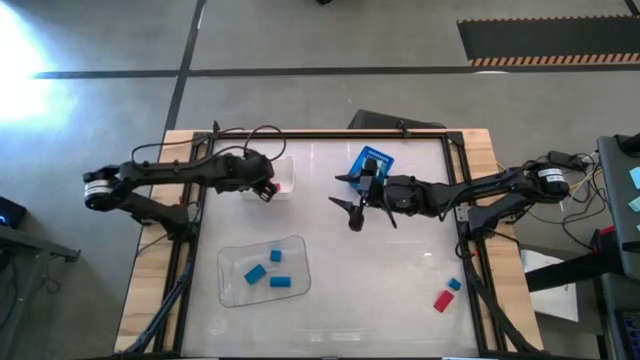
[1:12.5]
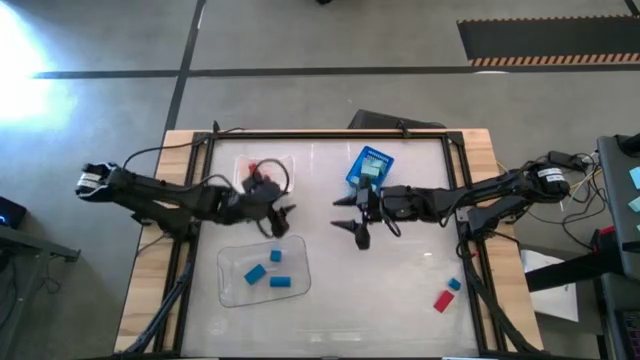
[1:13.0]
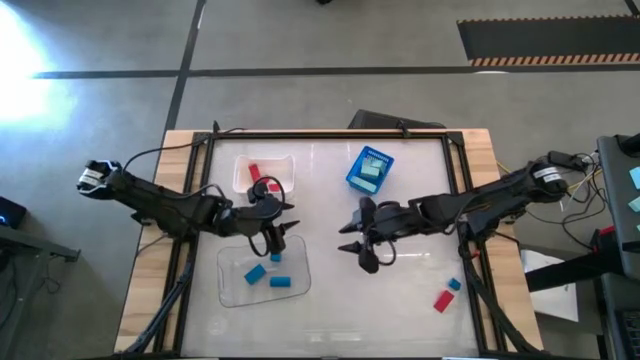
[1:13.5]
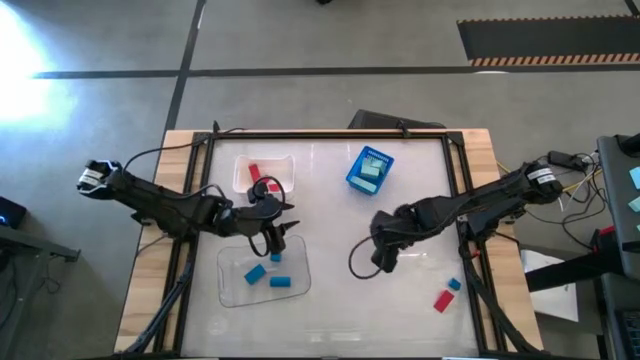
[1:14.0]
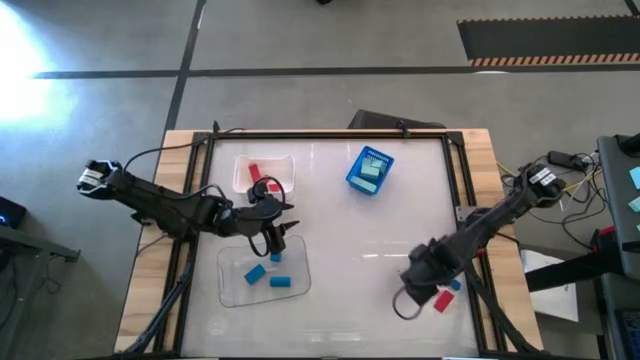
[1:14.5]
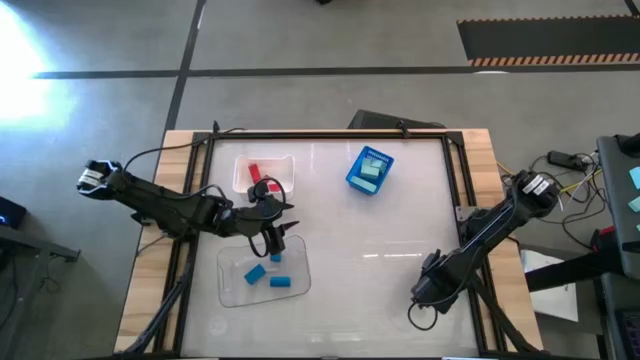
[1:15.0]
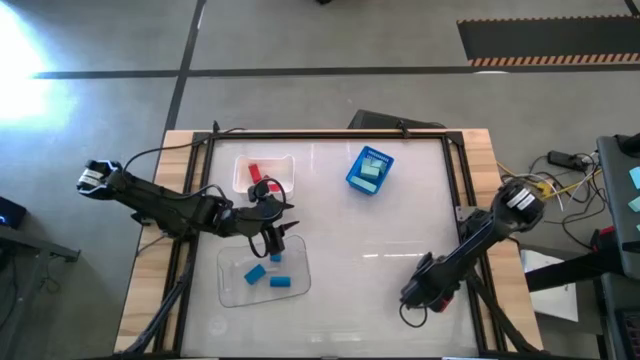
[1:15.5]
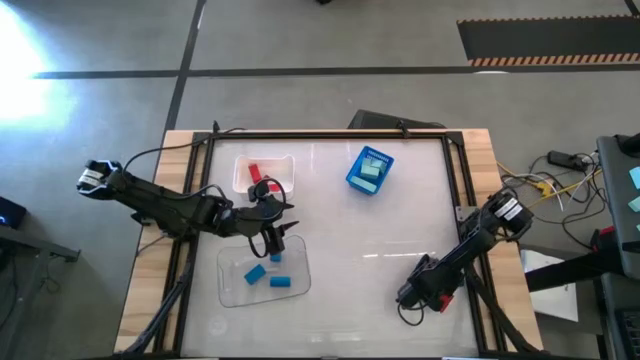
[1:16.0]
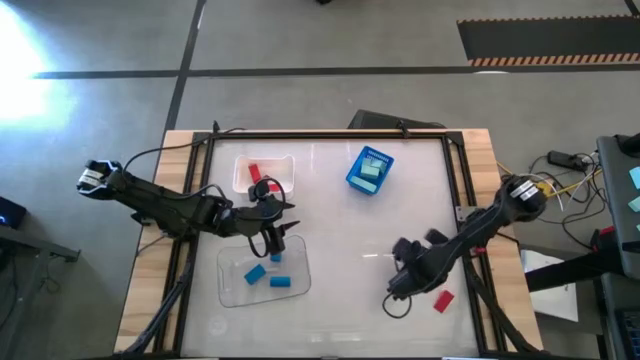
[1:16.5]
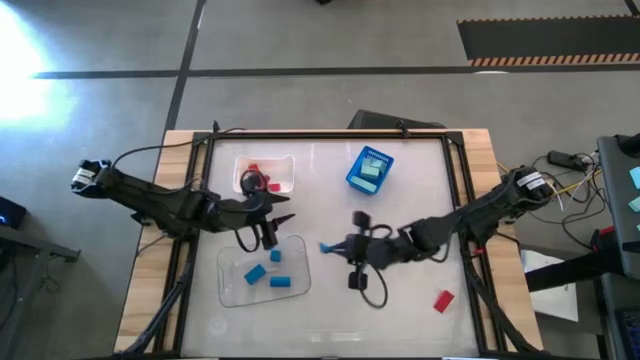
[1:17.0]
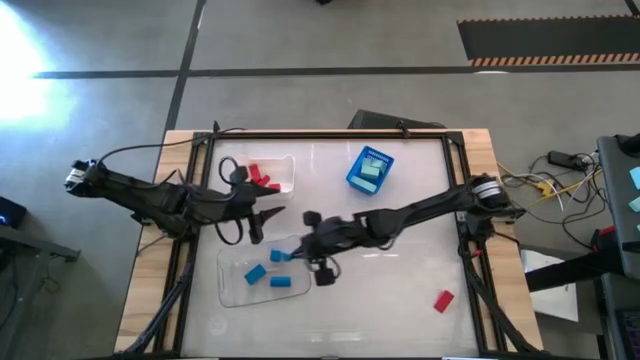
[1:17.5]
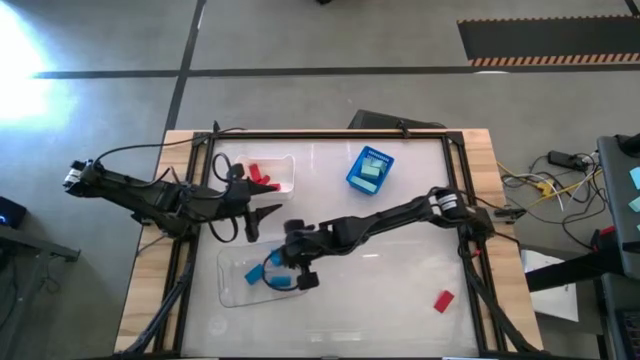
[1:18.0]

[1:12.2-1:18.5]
Task: Sort & place blocks by color
Put the blue block into the transparent bin

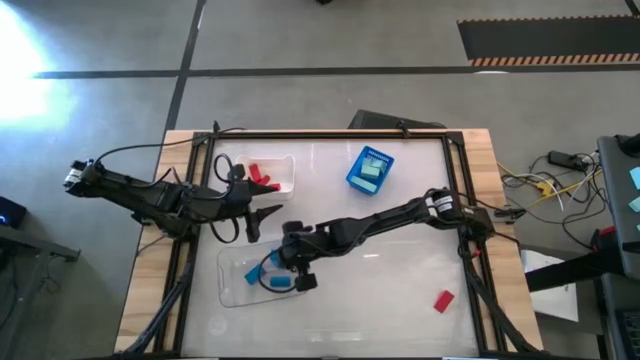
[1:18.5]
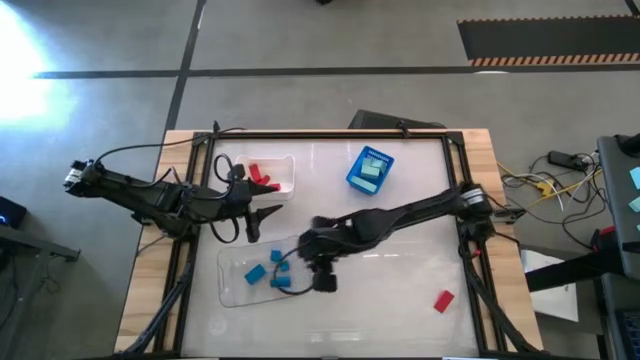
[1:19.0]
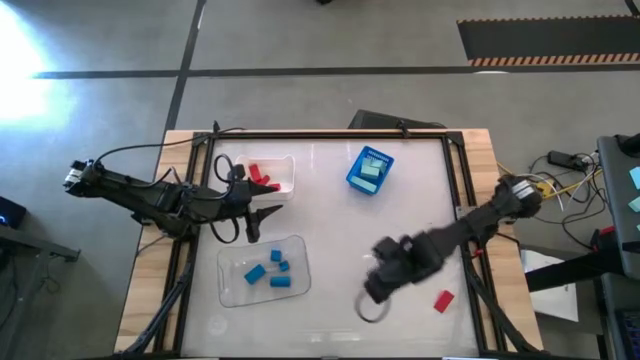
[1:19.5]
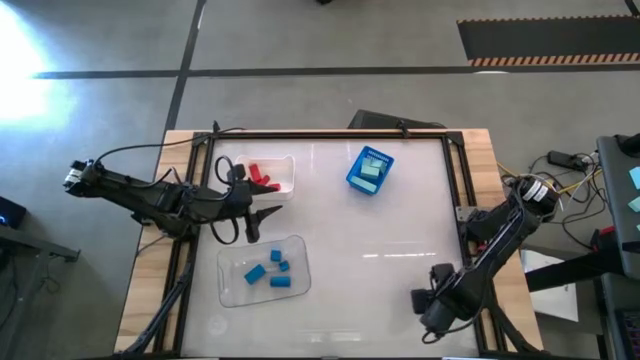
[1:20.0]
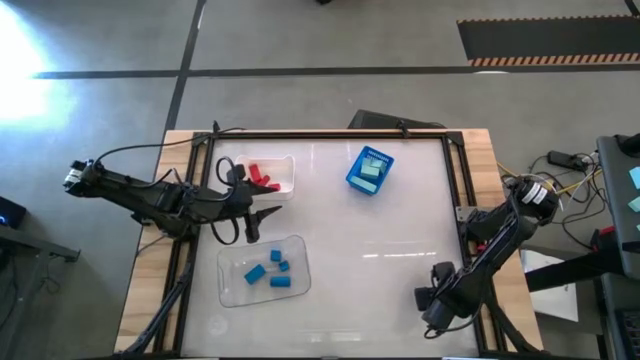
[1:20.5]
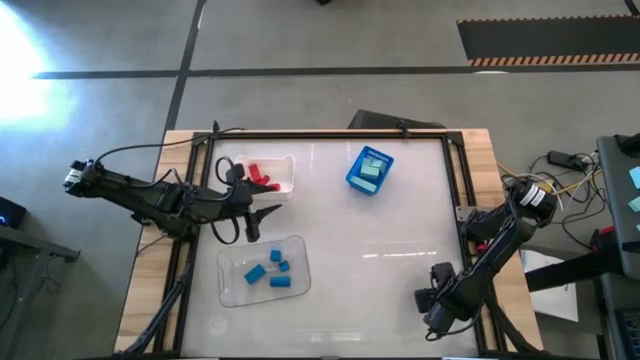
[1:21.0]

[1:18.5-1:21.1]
Put the red block into the white bin

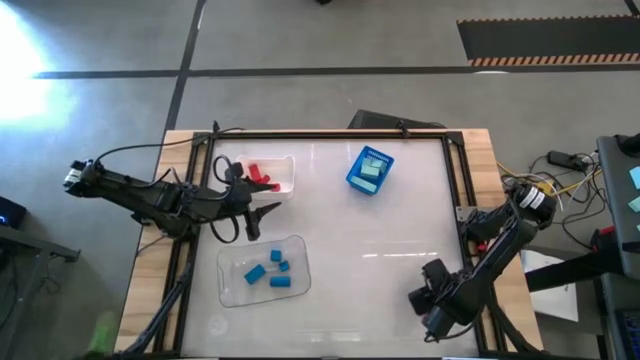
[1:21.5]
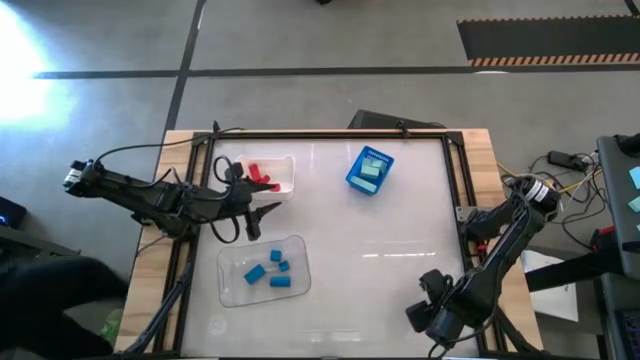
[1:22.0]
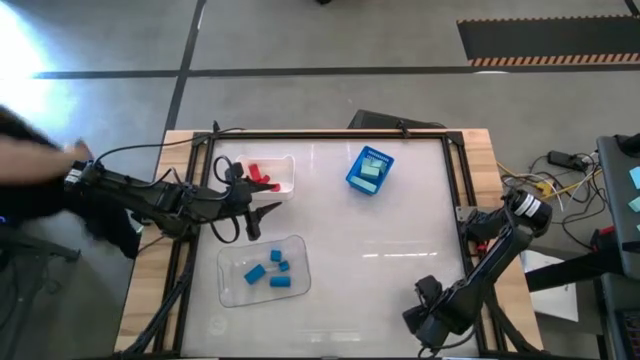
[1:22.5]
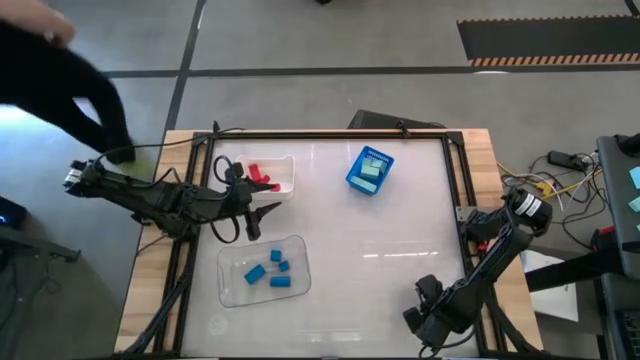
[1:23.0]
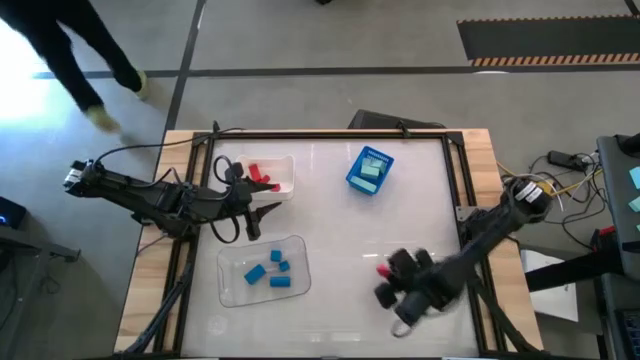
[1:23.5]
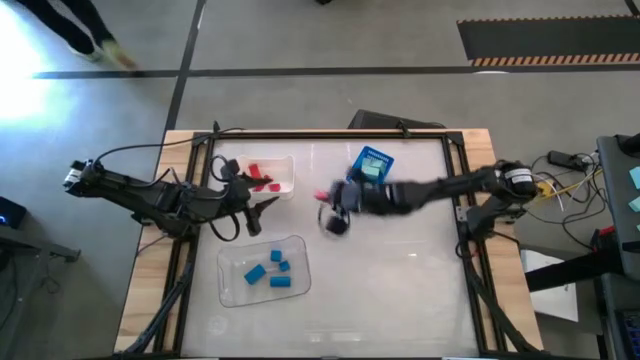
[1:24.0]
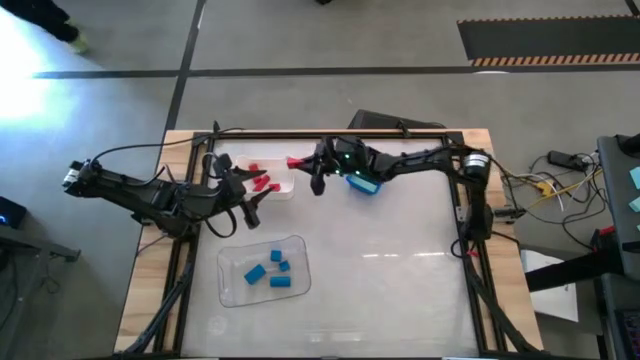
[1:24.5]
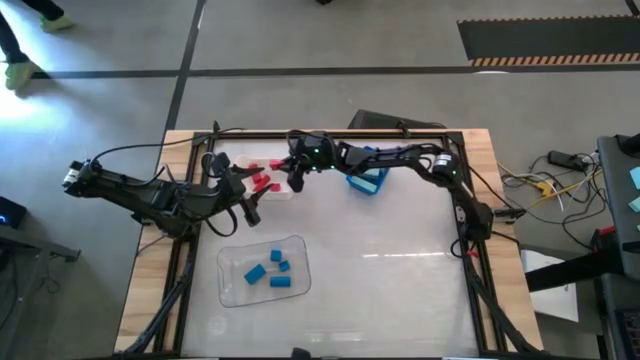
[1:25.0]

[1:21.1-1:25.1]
Put the red block into the white bin

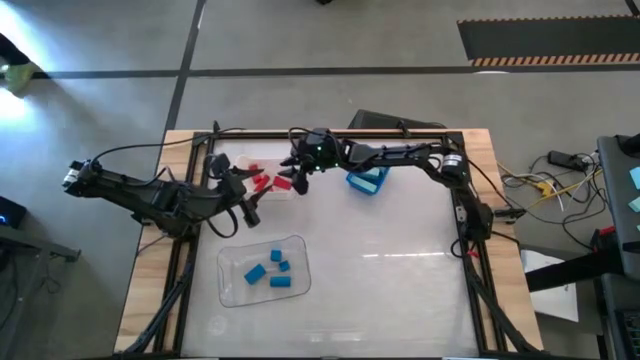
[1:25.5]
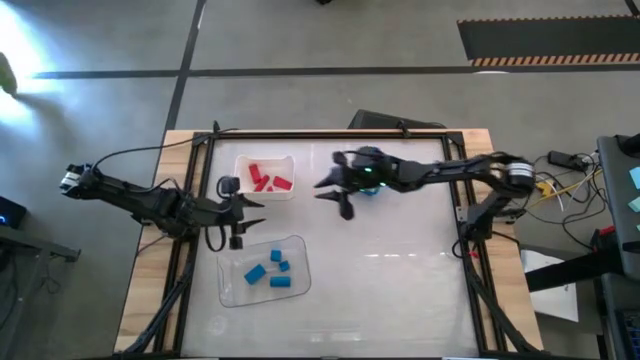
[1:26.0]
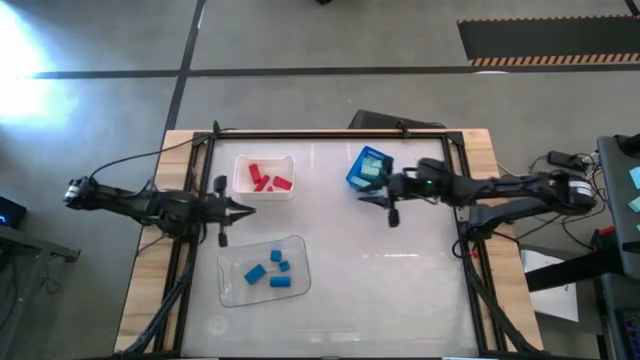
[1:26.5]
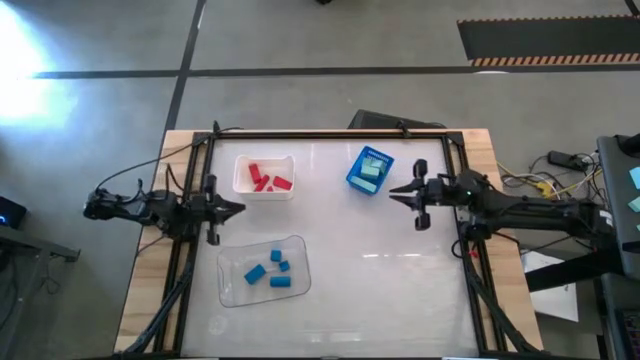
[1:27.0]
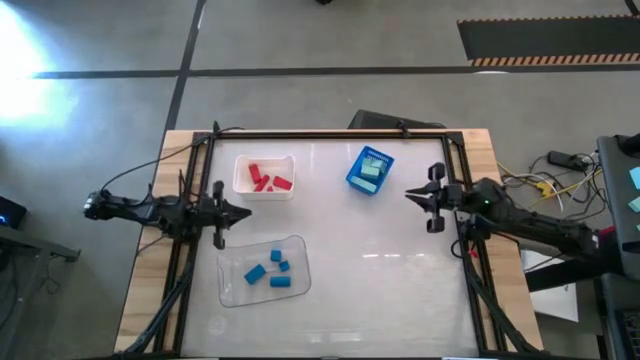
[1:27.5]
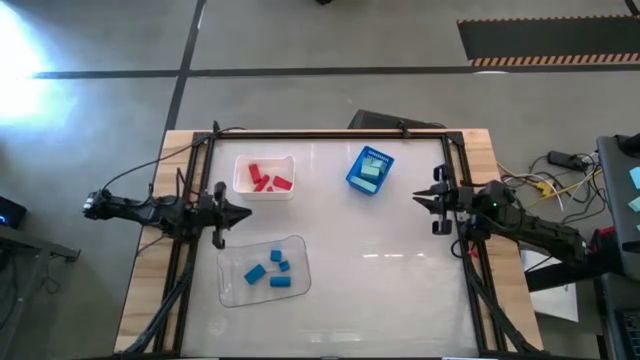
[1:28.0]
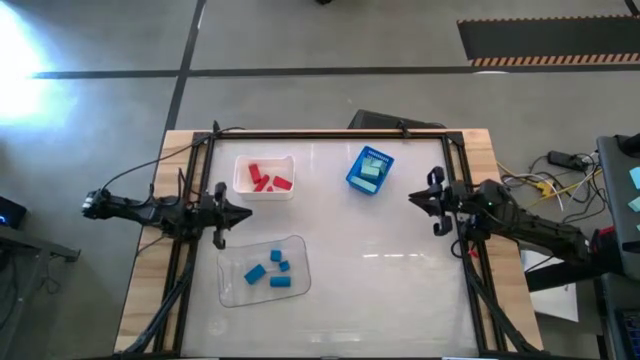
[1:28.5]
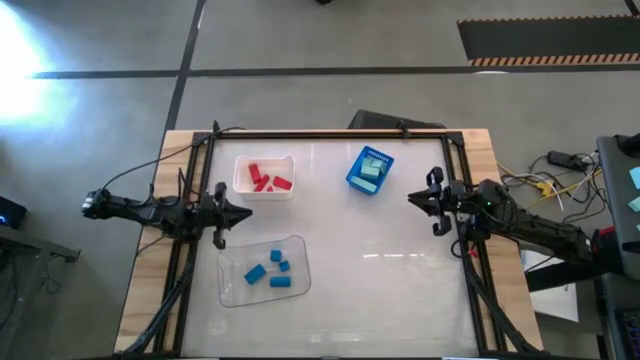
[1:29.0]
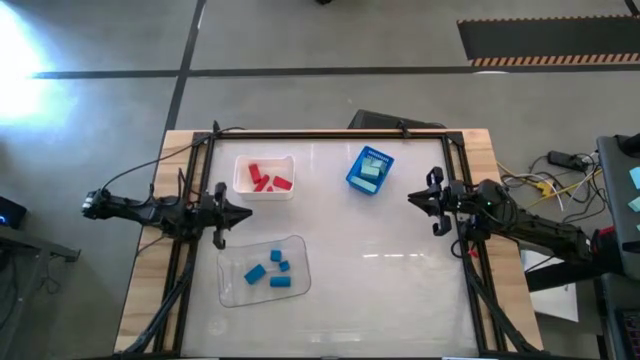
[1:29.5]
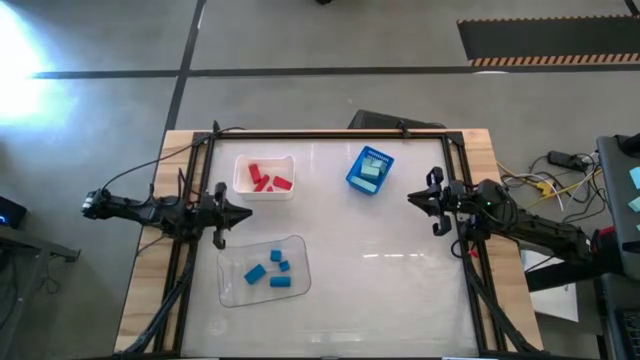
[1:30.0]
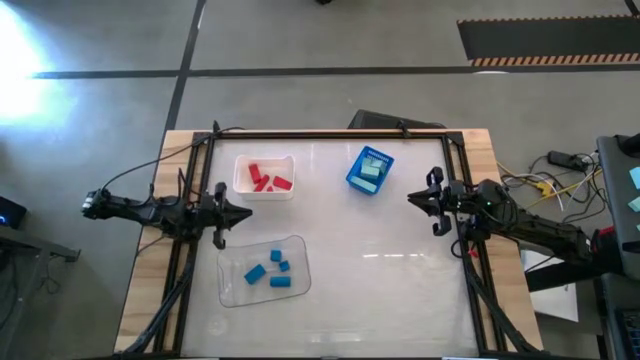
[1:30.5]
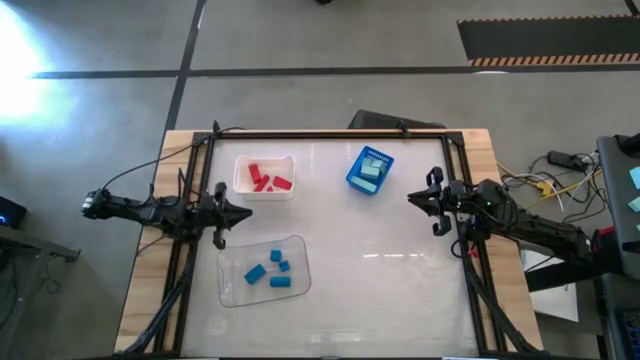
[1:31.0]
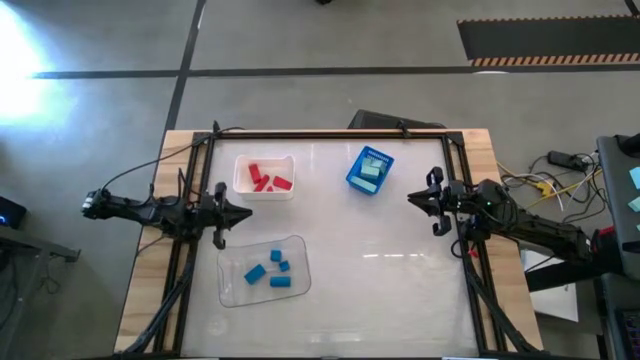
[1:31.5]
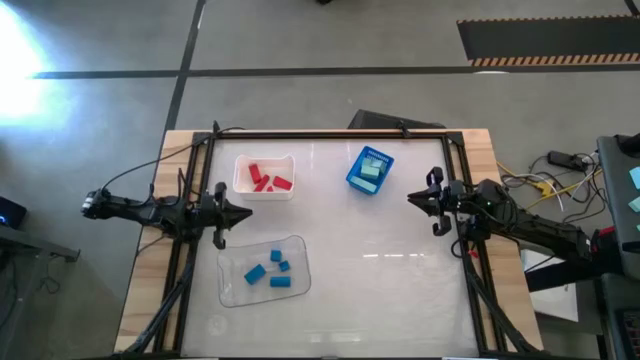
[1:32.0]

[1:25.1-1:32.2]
Return to Home Position
